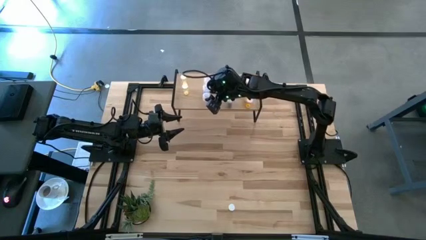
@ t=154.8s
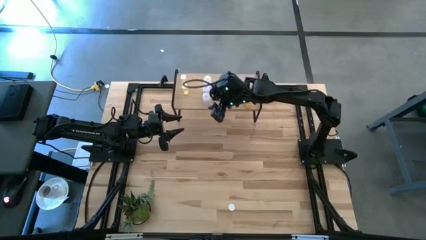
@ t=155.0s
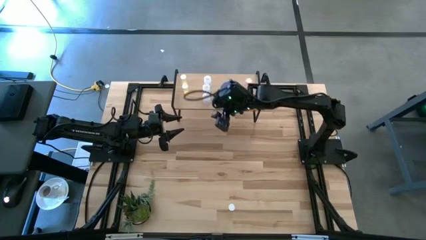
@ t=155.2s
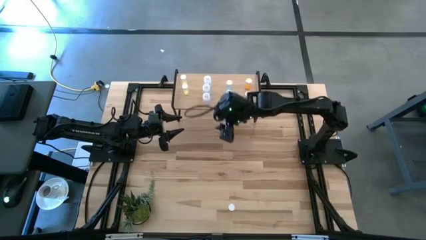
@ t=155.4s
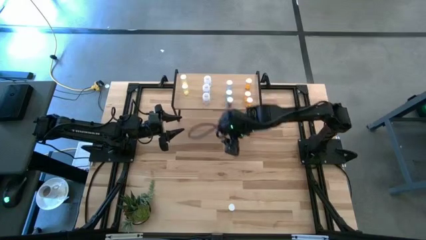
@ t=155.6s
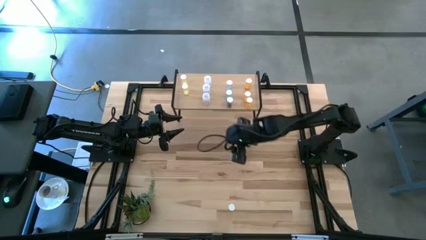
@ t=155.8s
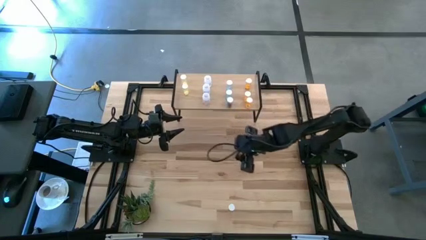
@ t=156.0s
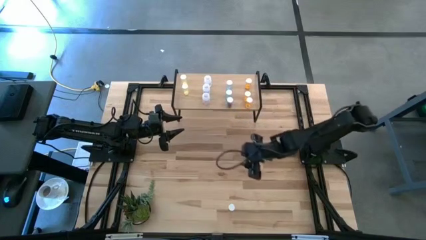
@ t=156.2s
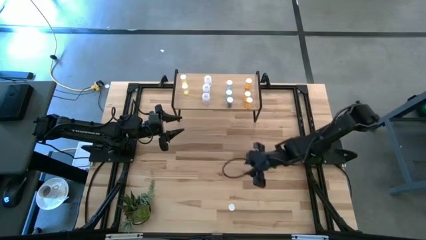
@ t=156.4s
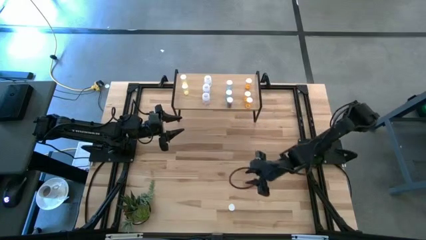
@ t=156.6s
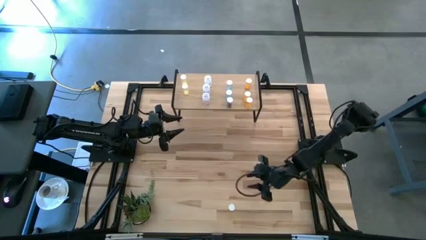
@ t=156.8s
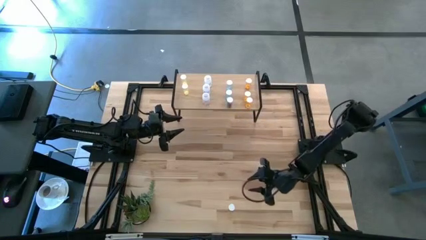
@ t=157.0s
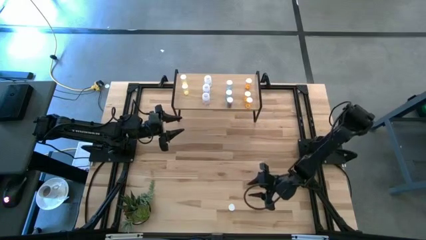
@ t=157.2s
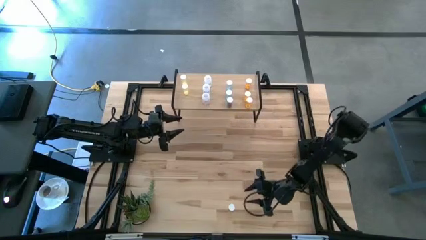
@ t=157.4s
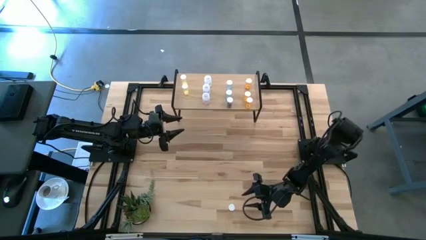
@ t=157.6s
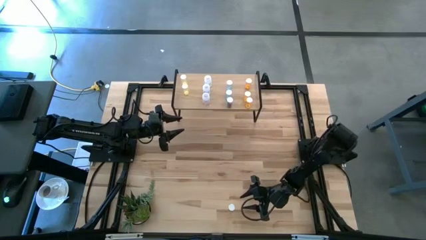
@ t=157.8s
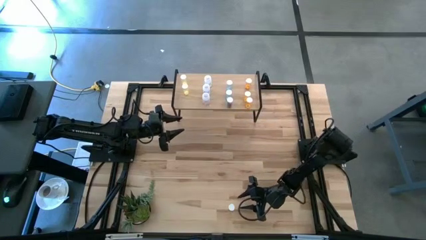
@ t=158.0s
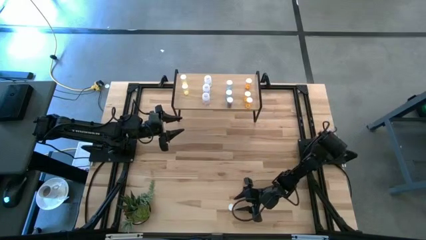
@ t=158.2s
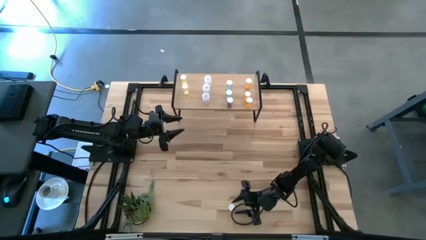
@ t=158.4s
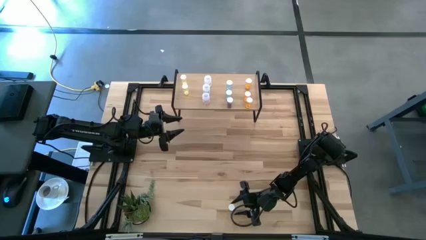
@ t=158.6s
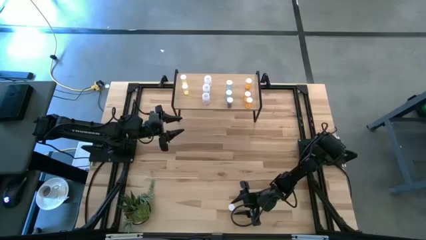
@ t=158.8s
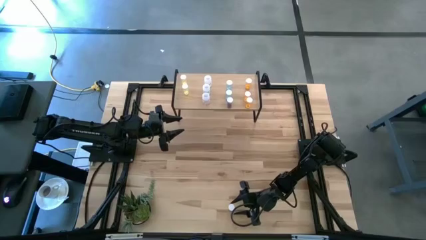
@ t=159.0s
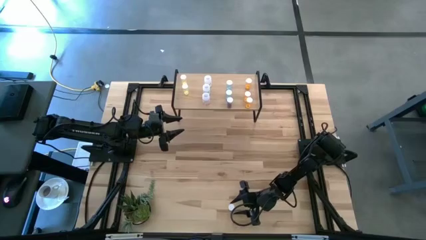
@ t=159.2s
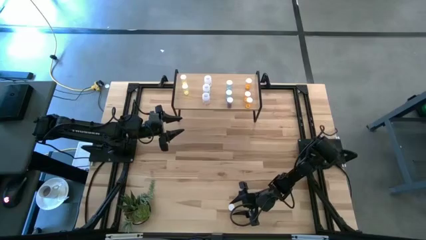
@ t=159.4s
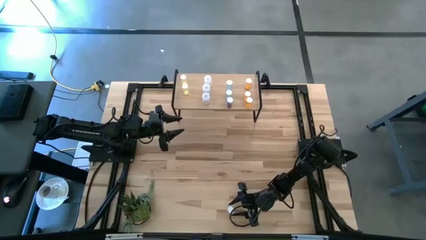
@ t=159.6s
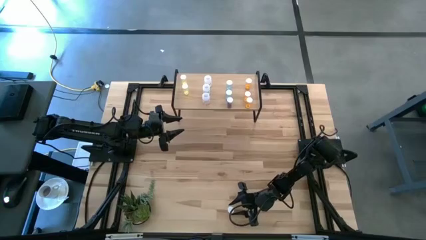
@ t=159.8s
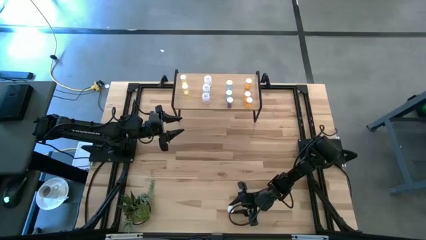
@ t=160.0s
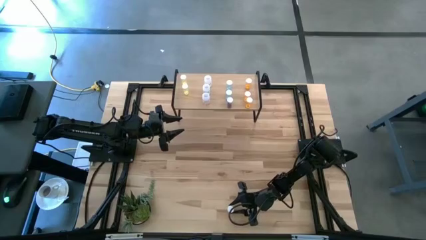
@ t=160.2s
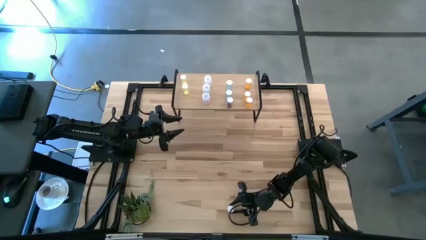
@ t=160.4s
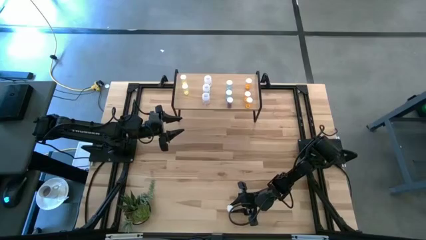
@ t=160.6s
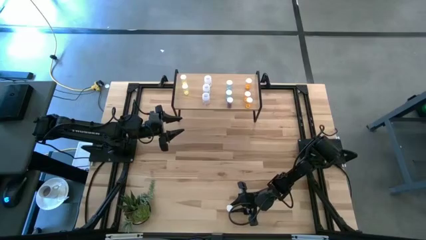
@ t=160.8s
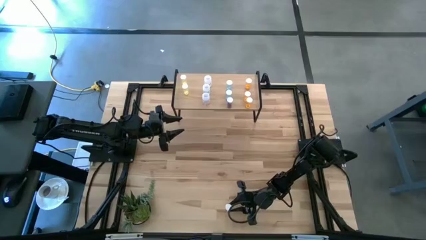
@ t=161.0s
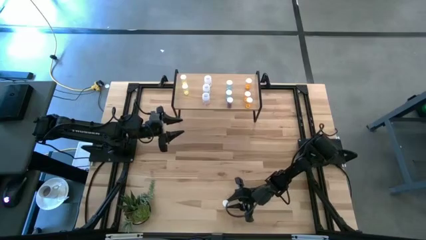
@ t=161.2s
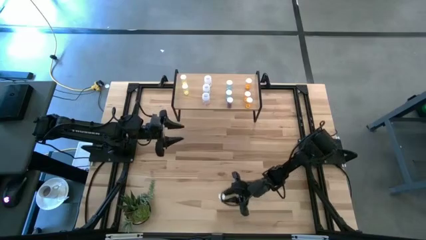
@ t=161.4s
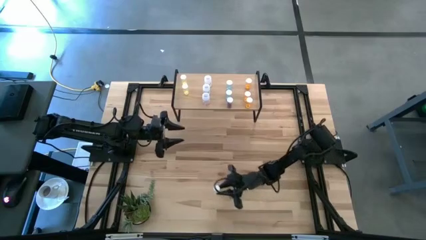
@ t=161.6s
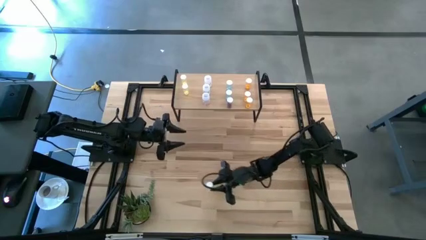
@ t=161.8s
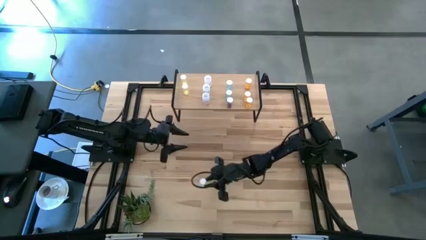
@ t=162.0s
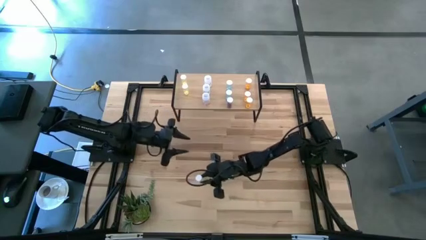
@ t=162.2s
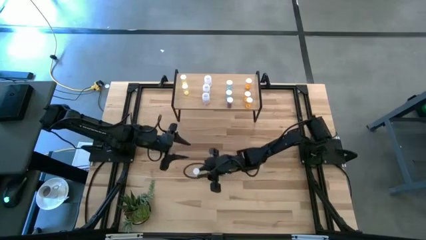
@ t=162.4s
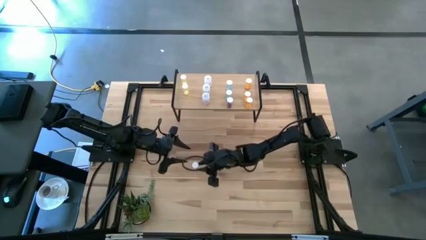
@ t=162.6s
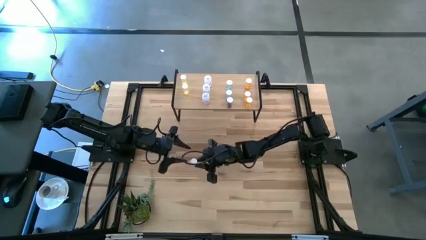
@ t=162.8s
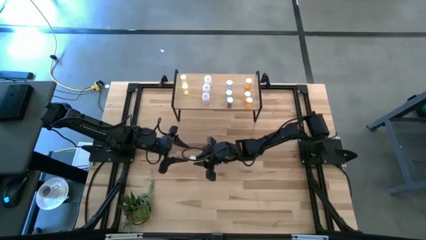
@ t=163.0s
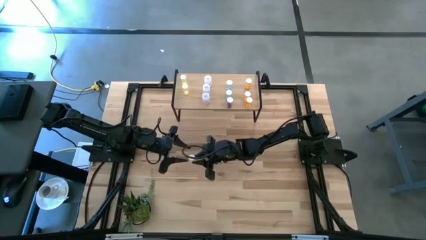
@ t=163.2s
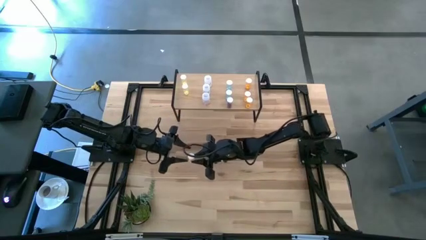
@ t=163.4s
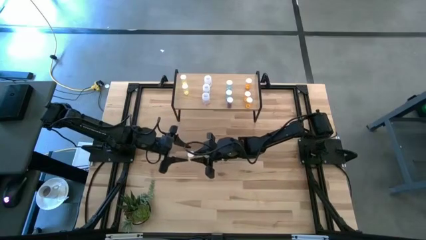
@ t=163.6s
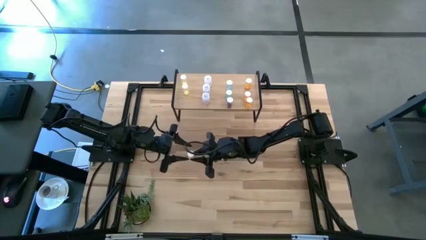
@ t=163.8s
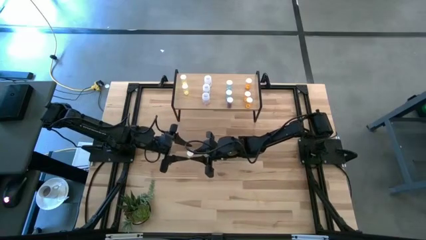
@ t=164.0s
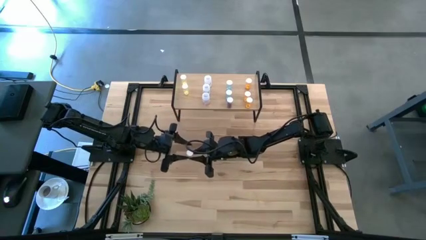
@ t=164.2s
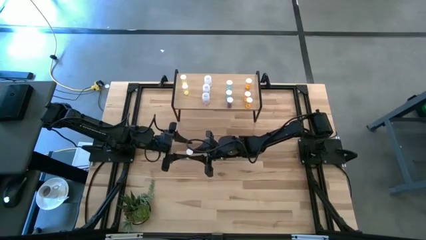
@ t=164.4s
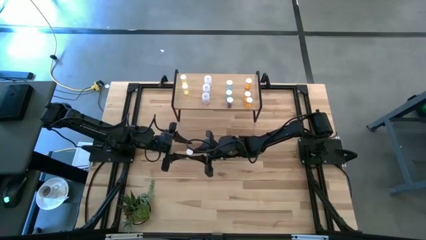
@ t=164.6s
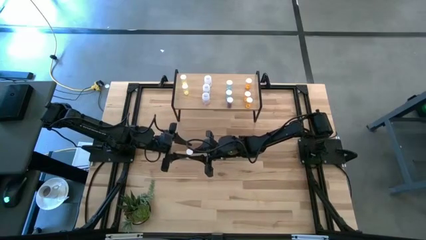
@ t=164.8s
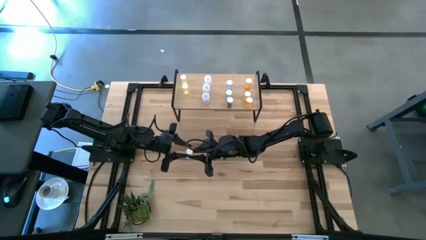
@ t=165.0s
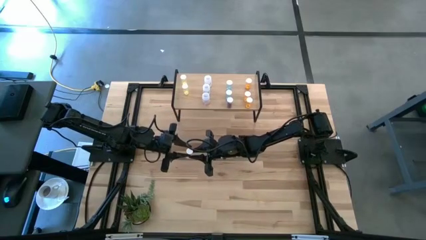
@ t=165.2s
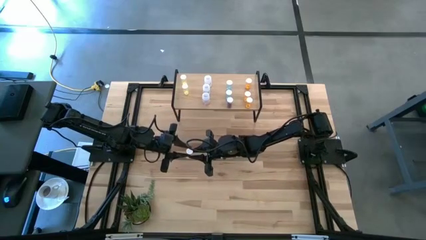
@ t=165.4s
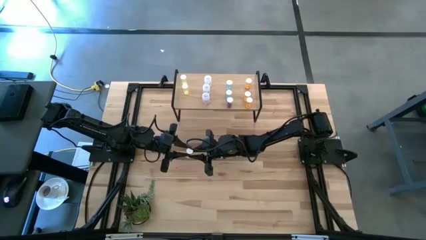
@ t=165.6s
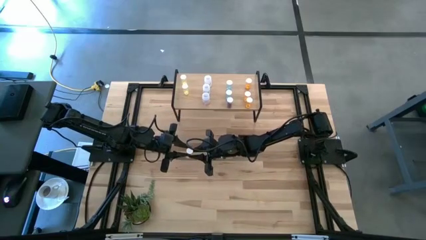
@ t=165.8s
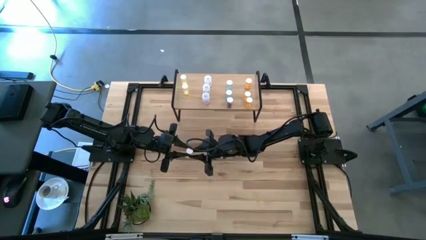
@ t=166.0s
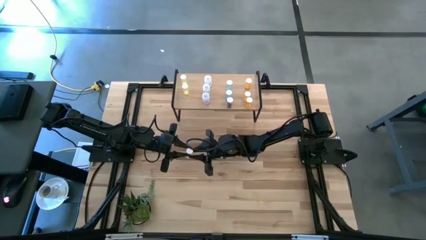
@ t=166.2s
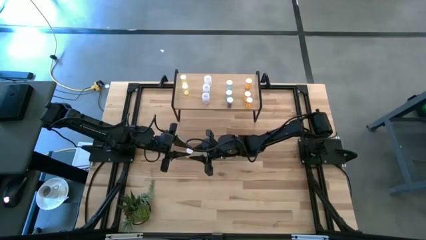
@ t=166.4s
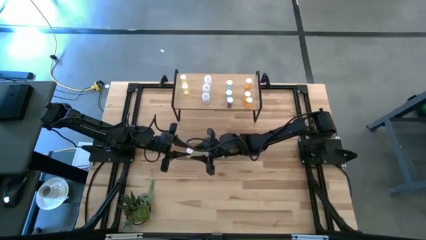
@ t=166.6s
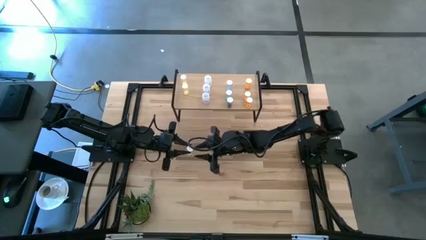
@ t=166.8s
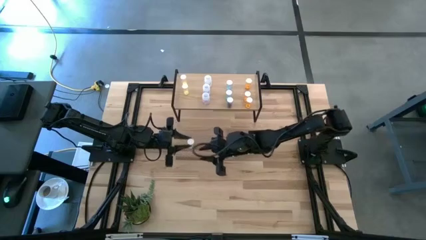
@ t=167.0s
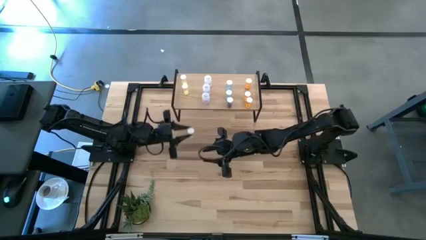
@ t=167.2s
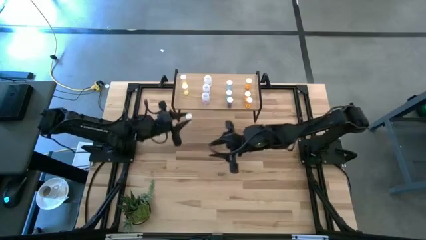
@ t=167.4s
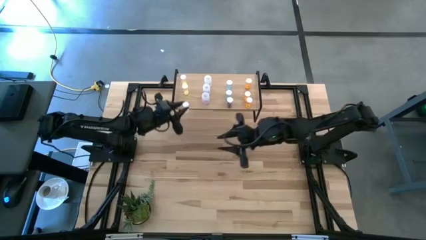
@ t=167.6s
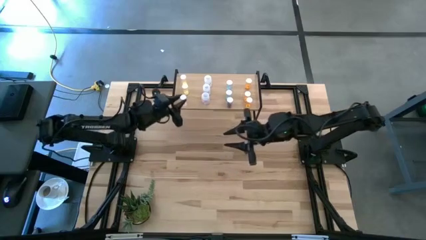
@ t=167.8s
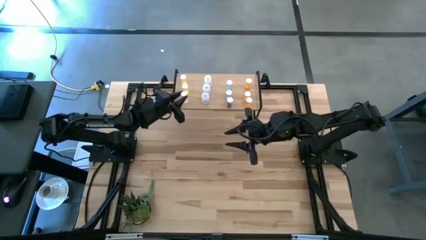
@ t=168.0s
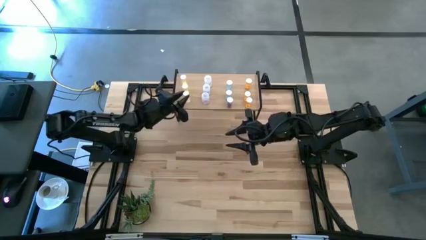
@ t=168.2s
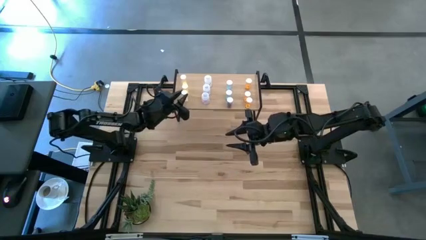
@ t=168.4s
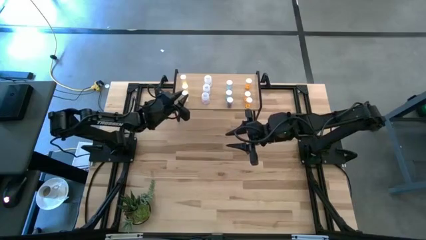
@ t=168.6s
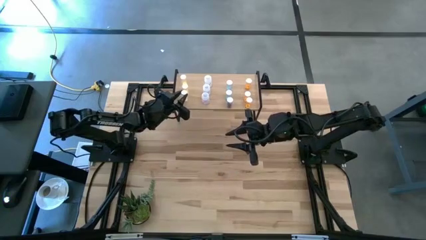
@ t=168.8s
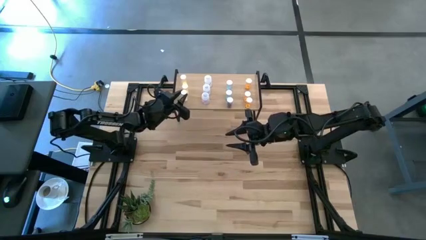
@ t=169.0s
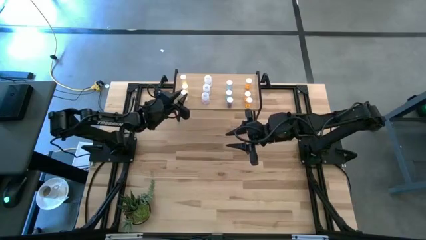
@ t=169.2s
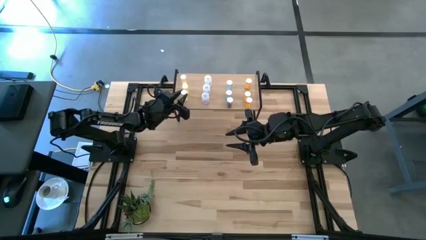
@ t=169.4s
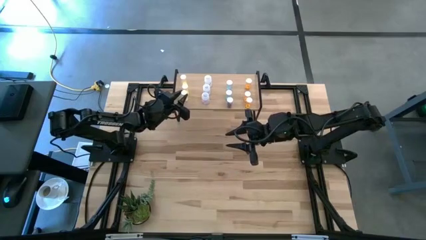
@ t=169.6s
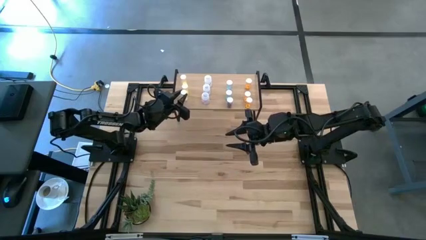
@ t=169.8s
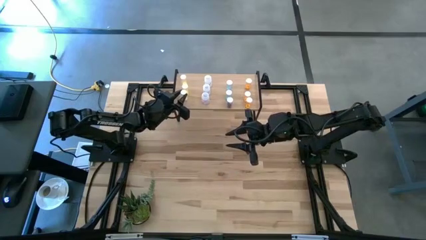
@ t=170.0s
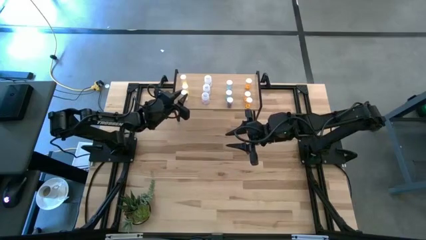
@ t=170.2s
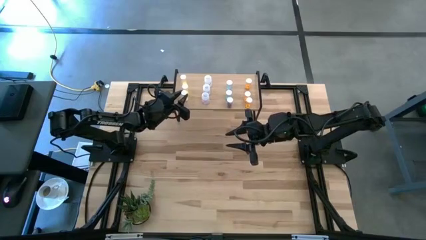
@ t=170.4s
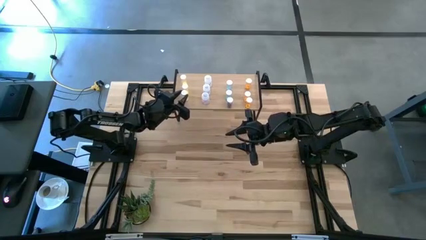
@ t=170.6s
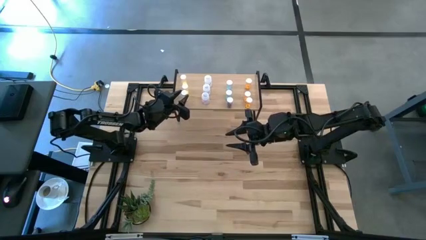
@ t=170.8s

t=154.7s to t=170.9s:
Task: Pick and place medicine bottles onto shelf by color
Put the yellow pill bottle on the shelf aligned with the yellow pill bottles
